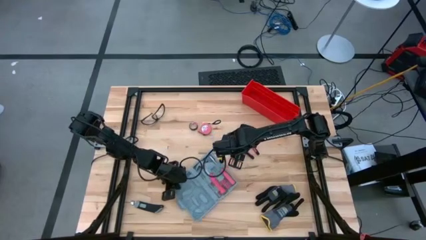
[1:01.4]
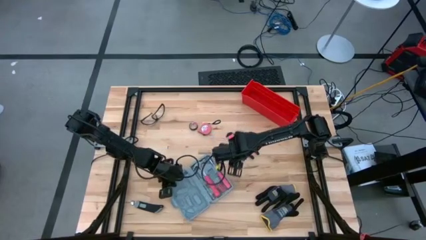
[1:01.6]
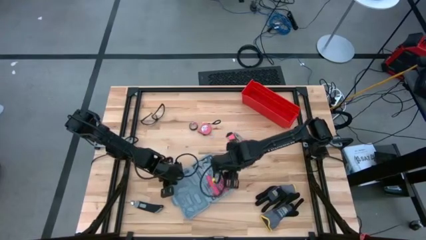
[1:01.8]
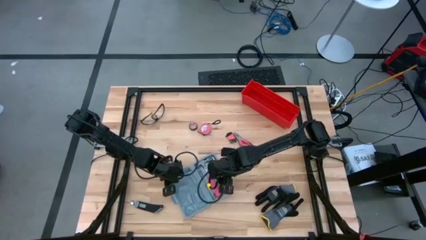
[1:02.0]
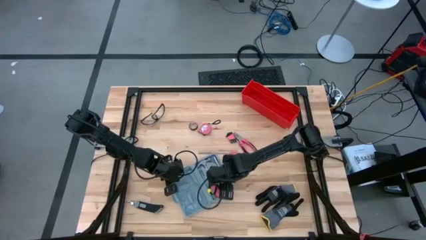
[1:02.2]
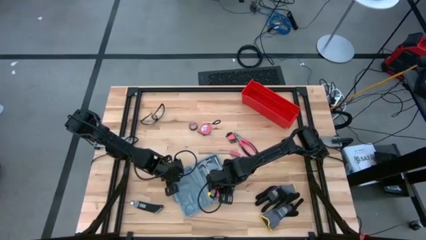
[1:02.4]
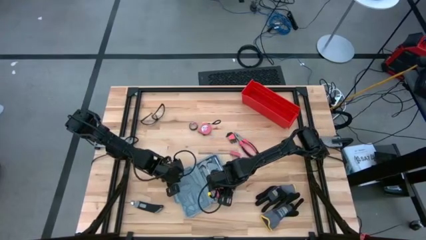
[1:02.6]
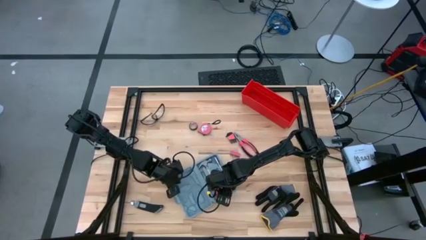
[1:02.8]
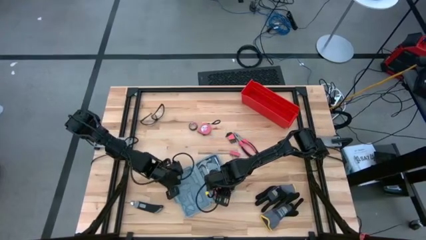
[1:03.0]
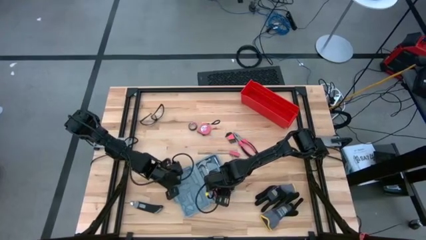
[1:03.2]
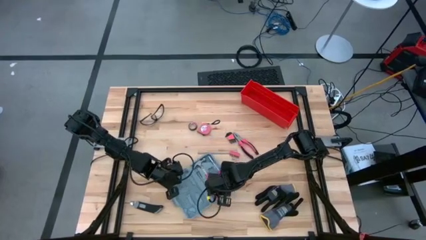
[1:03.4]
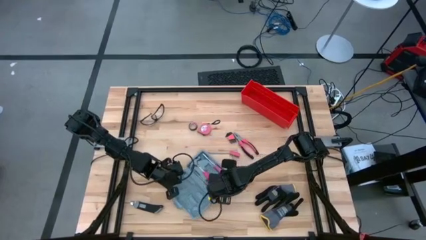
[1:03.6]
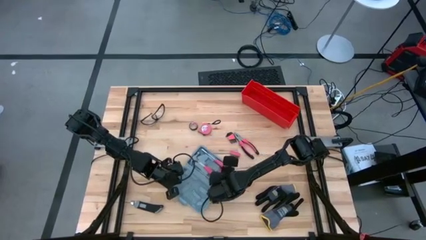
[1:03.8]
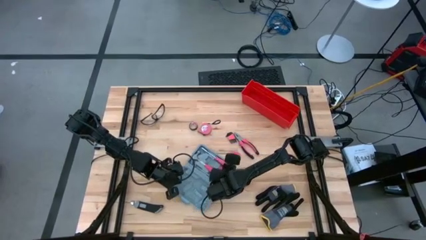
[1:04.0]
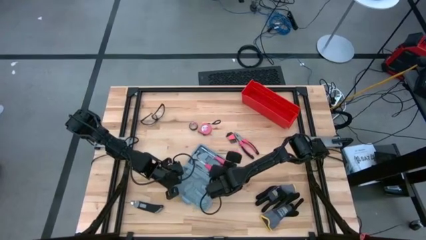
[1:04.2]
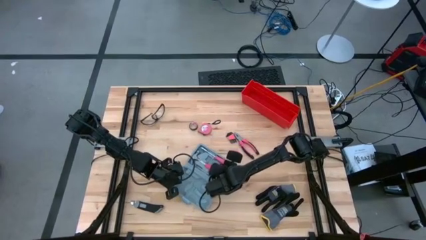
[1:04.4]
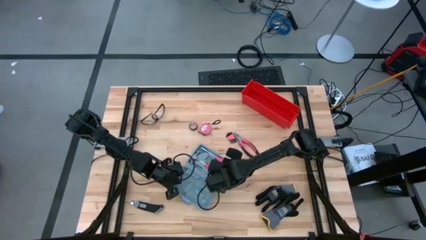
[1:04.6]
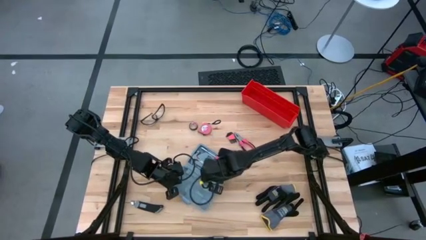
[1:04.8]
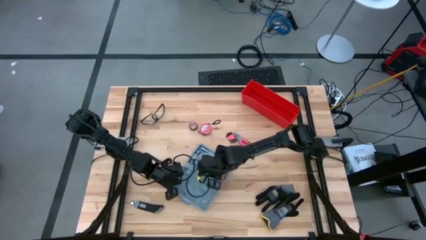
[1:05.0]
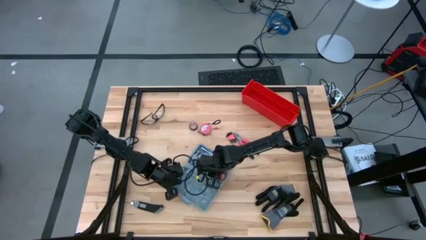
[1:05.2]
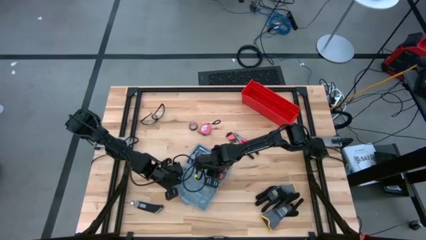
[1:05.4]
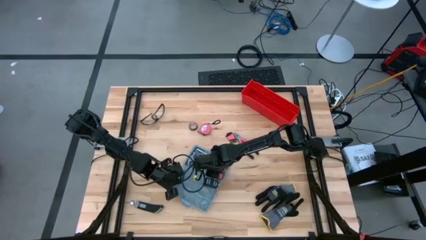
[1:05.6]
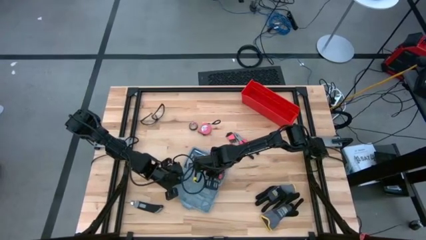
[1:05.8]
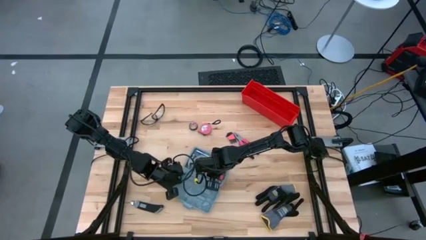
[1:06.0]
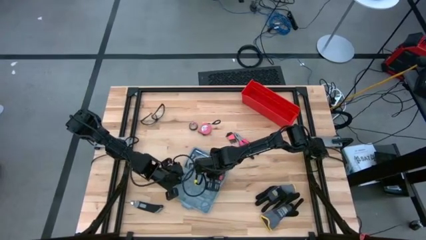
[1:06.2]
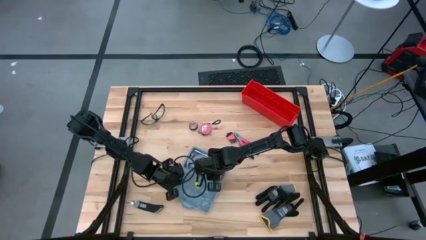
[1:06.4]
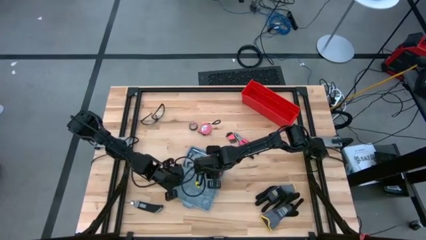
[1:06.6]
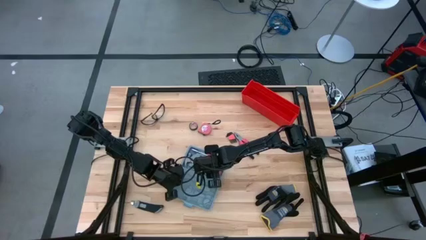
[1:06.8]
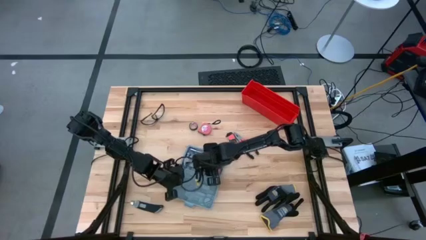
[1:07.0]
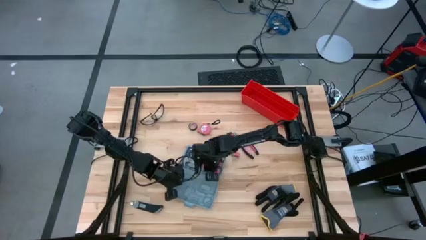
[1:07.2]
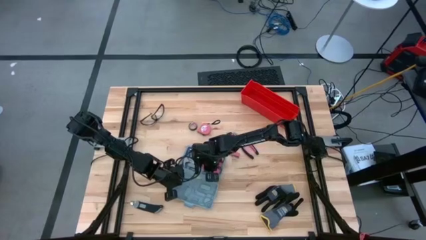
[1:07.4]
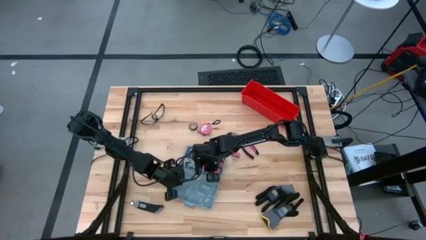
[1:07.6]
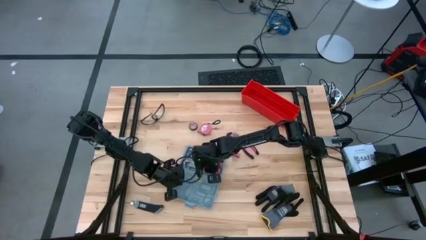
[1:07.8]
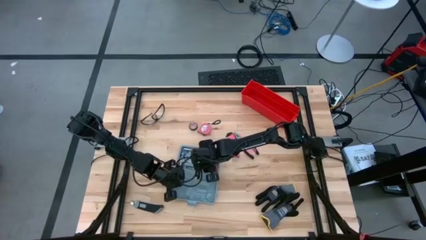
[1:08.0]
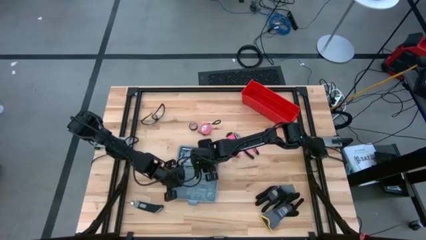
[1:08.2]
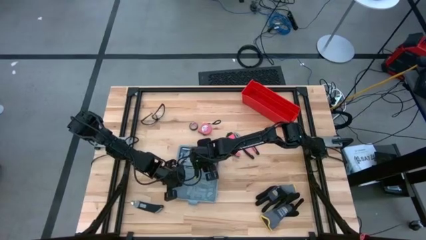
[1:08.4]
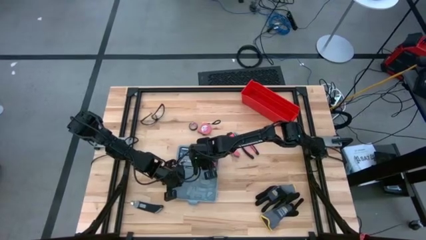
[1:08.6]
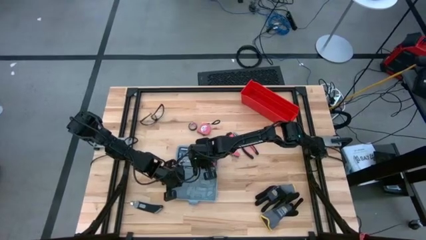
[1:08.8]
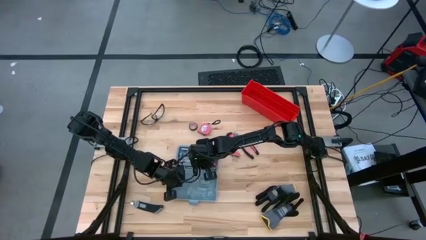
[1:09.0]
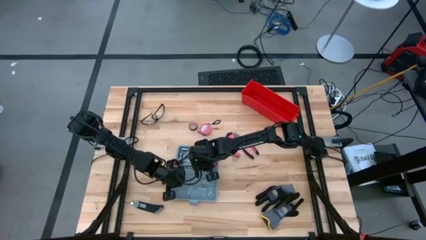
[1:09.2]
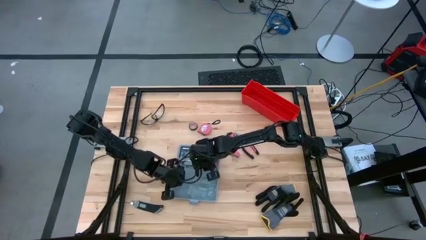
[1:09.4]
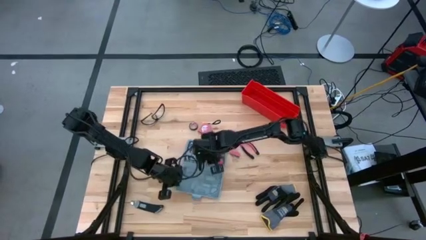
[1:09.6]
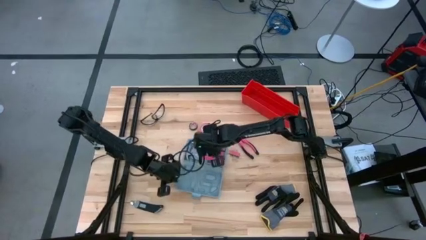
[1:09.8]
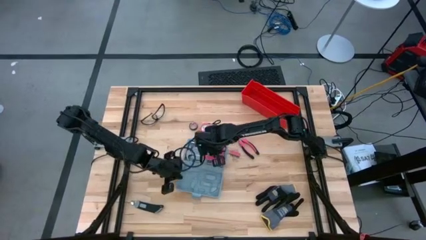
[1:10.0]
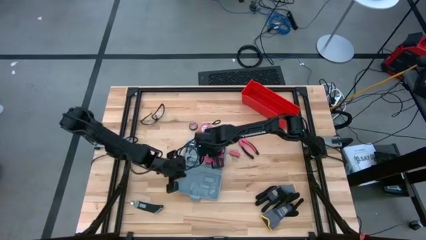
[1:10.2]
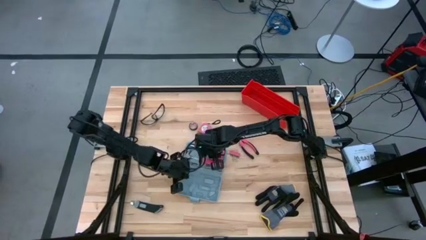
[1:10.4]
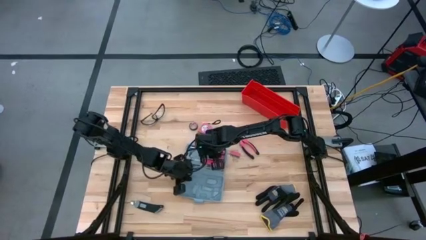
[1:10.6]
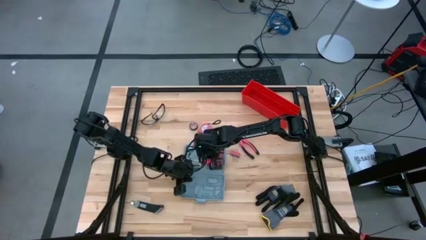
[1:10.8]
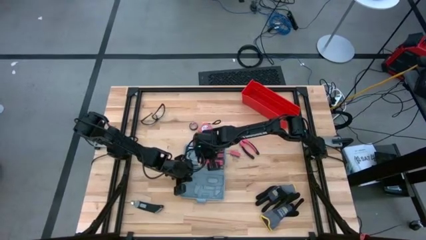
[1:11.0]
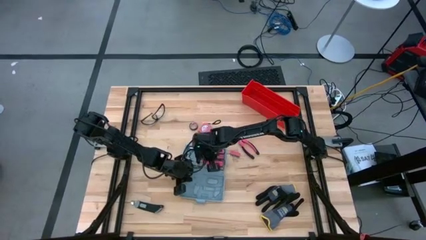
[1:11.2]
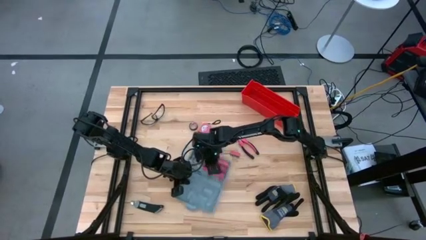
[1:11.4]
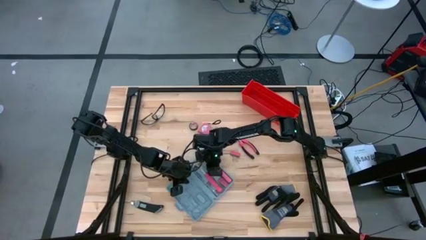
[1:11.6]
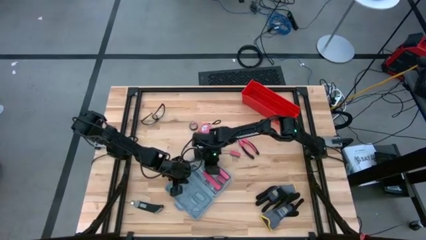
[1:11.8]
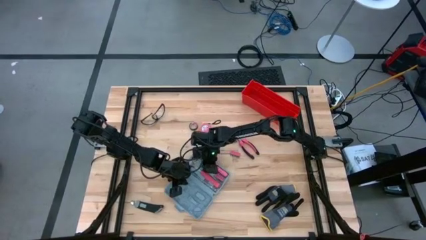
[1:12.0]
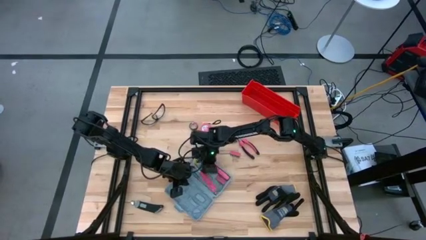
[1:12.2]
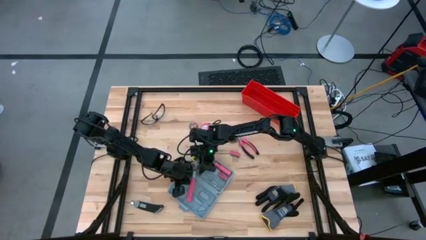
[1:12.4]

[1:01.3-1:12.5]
Task: prefit tool cases
Remove the hammer from the toolbox

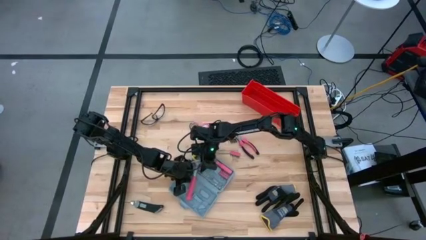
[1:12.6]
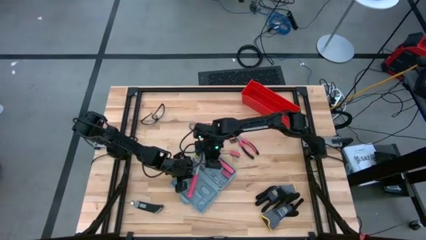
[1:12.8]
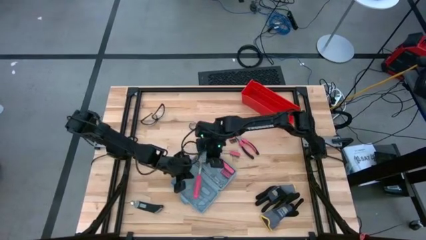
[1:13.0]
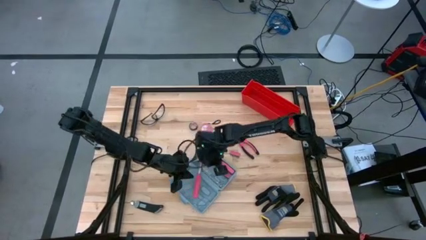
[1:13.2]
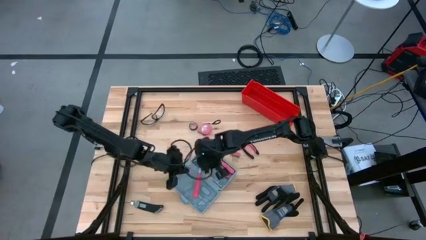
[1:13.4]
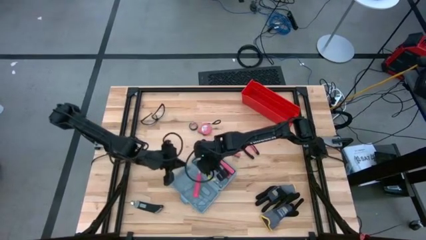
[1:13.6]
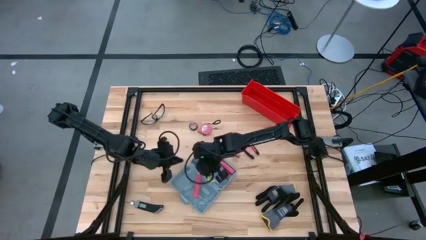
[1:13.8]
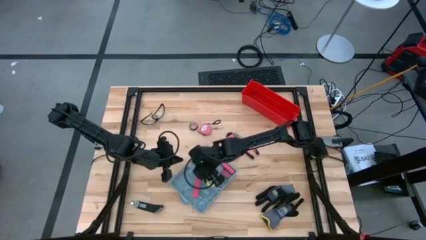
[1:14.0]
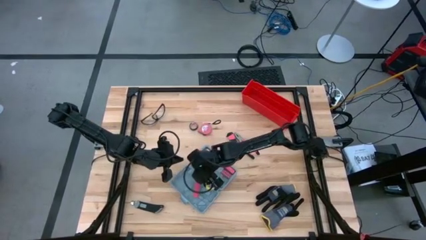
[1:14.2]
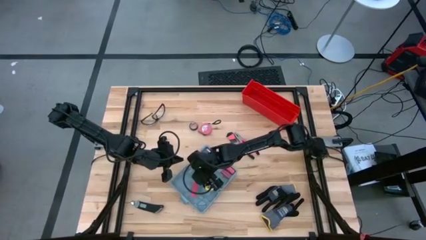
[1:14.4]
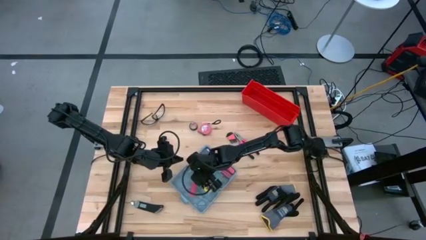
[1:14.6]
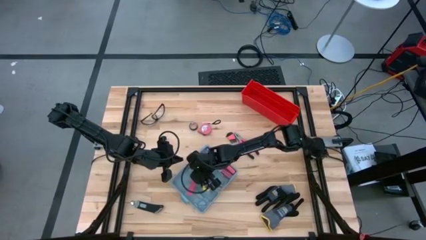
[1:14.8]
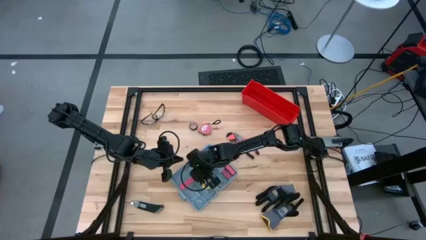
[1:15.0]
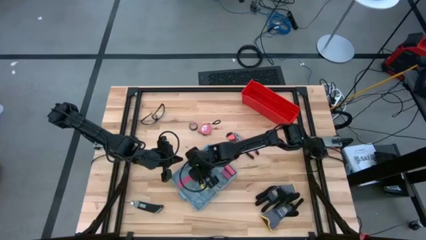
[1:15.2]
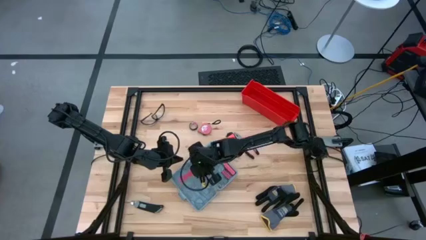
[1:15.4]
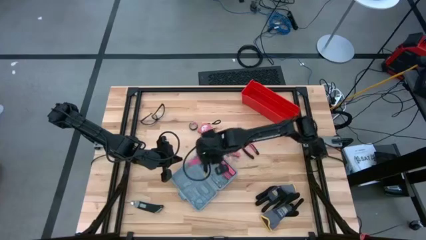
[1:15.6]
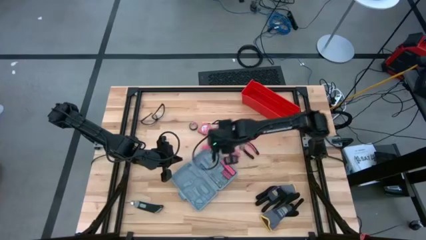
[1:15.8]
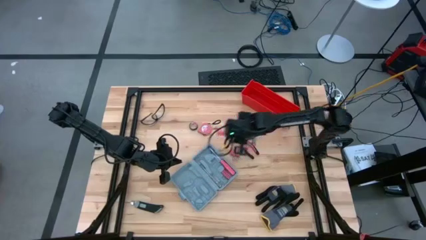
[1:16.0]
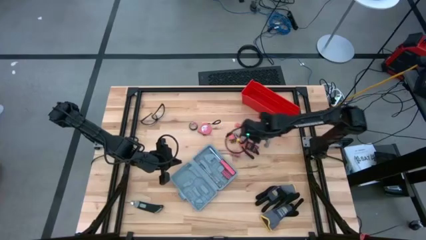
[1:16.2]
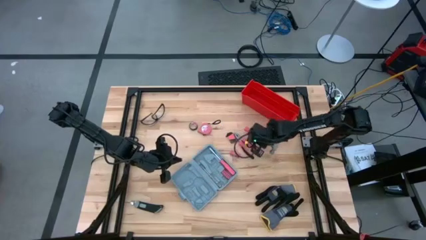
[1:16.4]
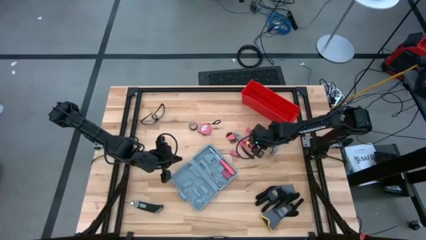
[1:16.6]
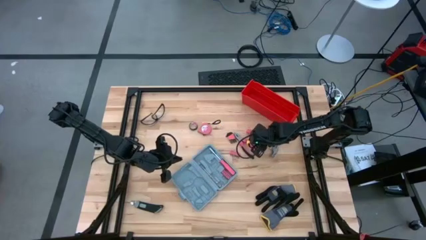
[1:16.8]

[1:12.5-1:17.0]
Remove the hammer from the toolbox
